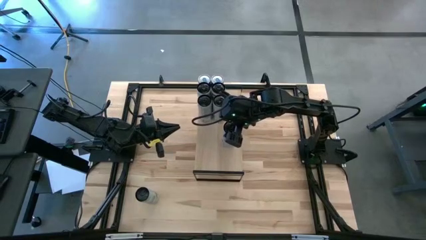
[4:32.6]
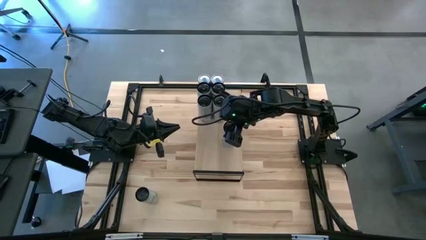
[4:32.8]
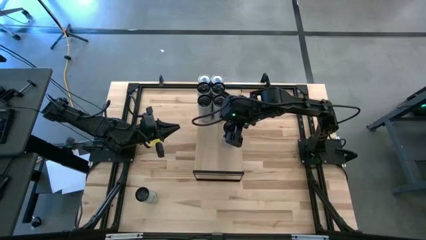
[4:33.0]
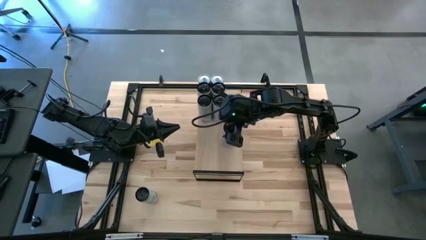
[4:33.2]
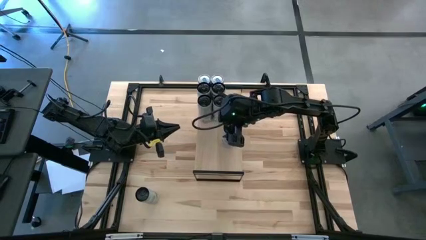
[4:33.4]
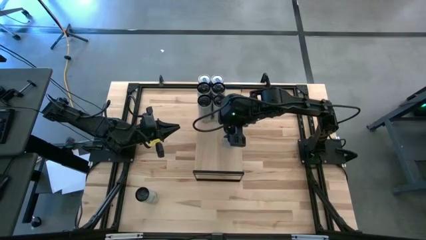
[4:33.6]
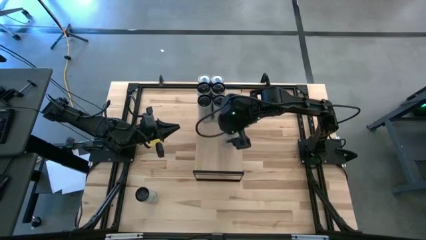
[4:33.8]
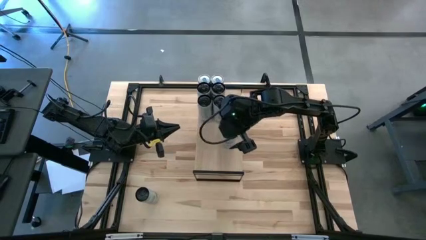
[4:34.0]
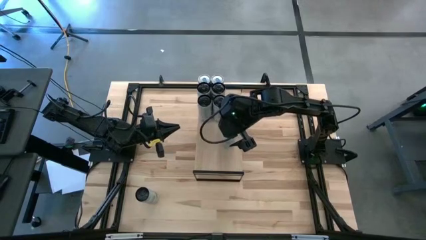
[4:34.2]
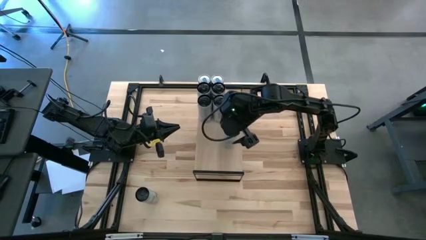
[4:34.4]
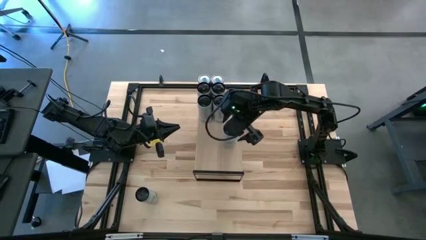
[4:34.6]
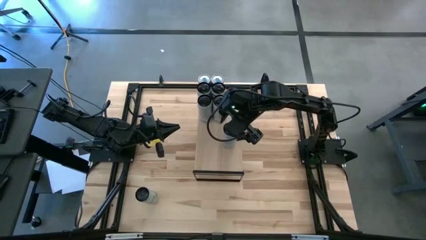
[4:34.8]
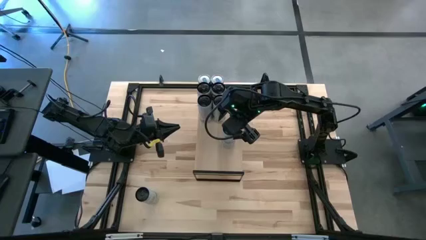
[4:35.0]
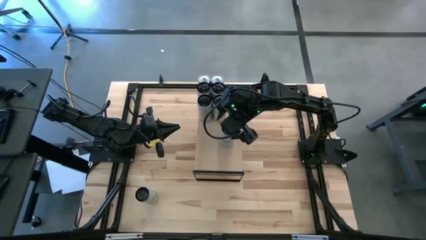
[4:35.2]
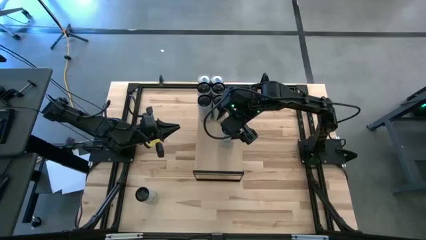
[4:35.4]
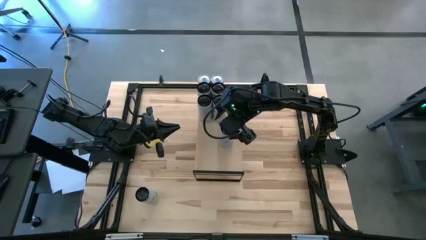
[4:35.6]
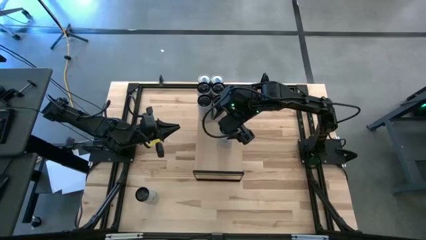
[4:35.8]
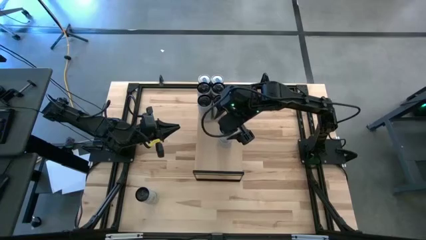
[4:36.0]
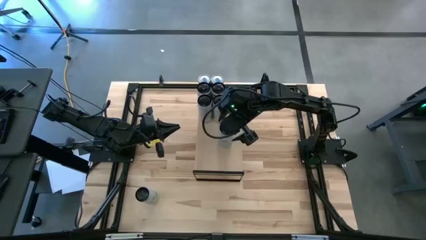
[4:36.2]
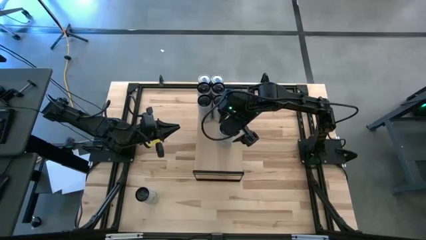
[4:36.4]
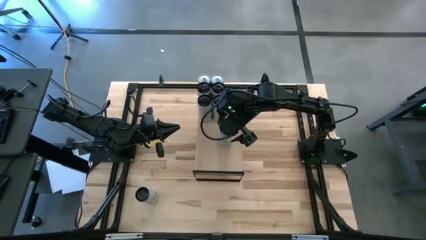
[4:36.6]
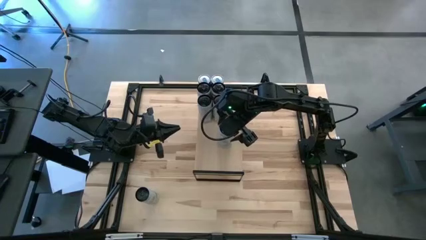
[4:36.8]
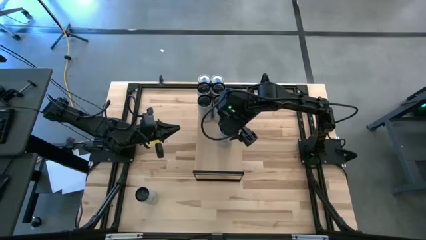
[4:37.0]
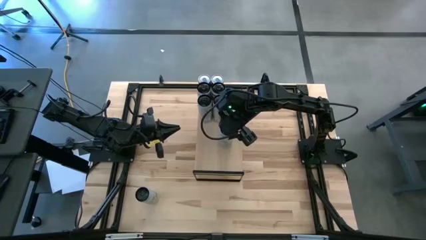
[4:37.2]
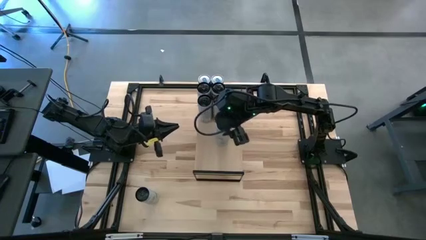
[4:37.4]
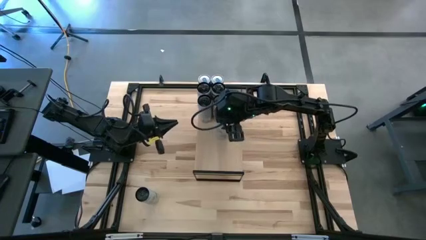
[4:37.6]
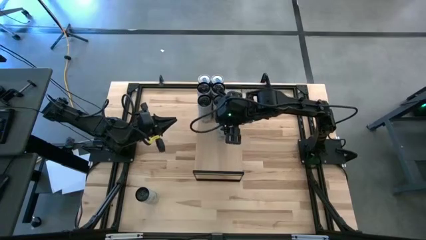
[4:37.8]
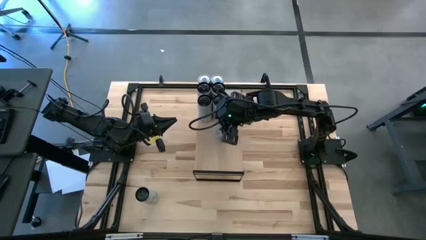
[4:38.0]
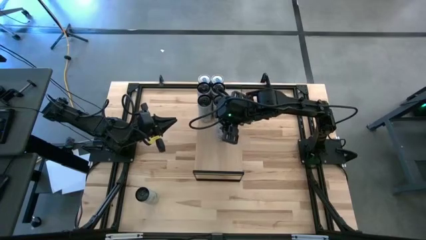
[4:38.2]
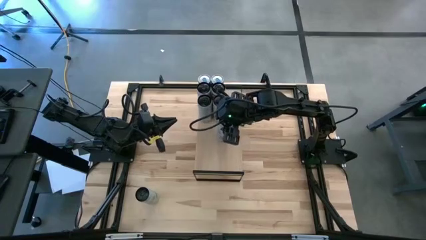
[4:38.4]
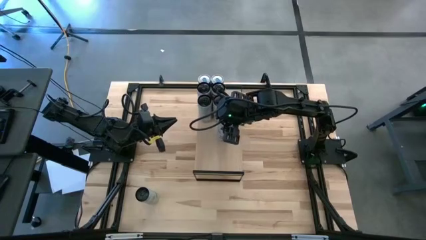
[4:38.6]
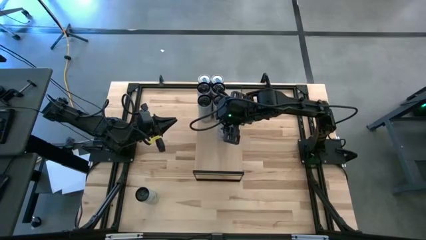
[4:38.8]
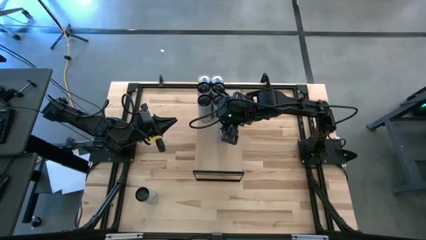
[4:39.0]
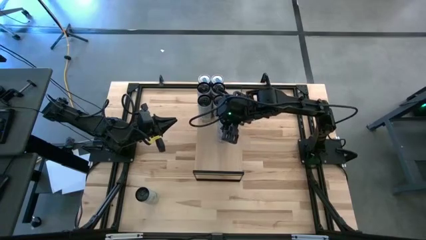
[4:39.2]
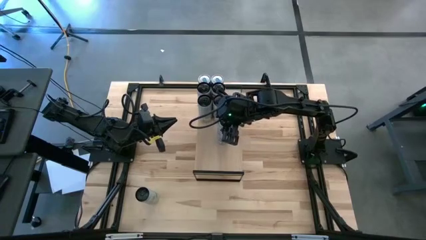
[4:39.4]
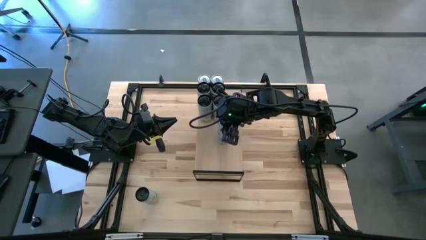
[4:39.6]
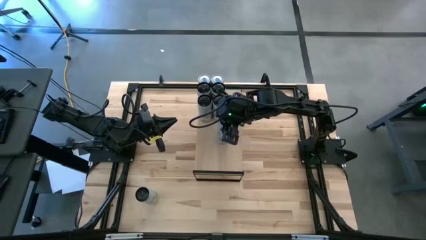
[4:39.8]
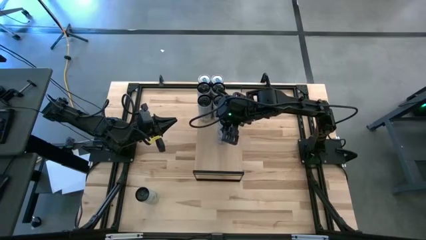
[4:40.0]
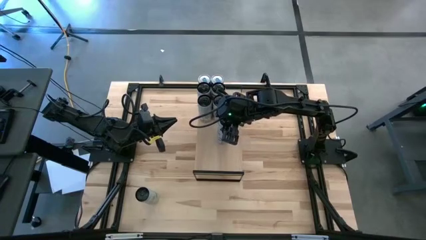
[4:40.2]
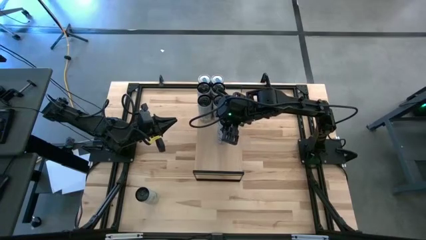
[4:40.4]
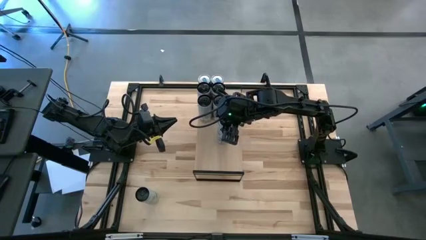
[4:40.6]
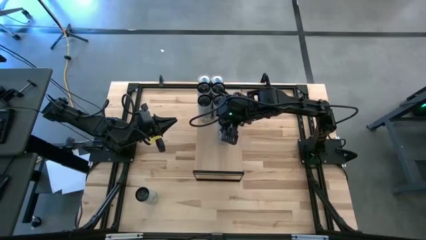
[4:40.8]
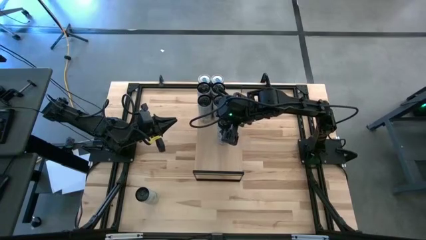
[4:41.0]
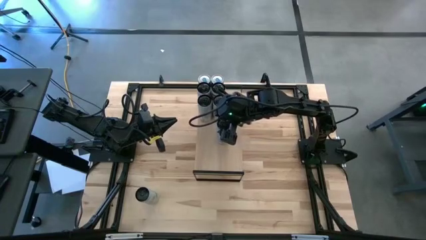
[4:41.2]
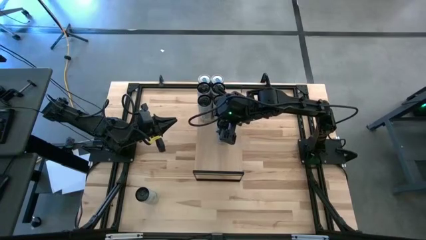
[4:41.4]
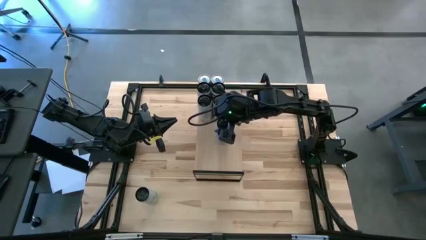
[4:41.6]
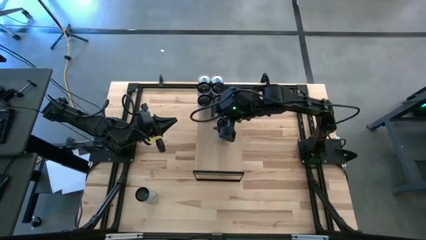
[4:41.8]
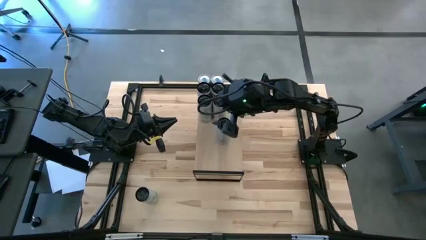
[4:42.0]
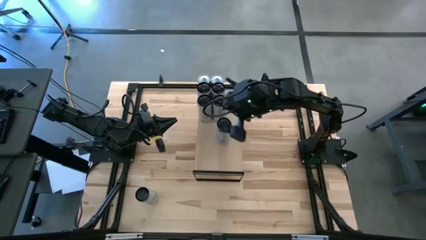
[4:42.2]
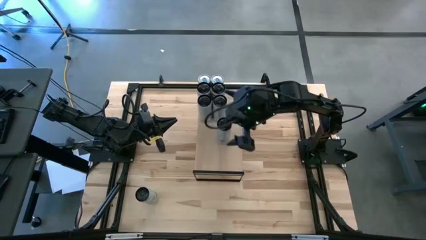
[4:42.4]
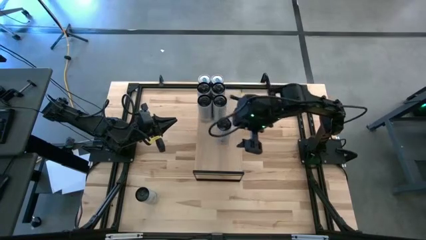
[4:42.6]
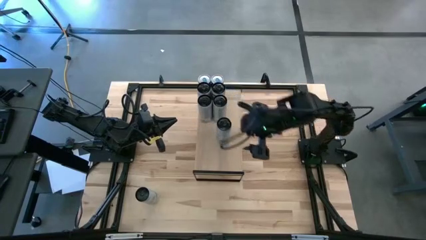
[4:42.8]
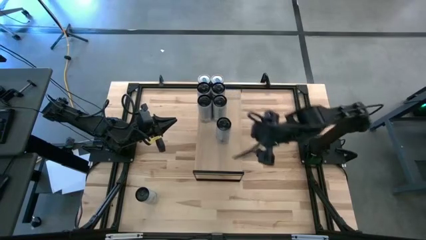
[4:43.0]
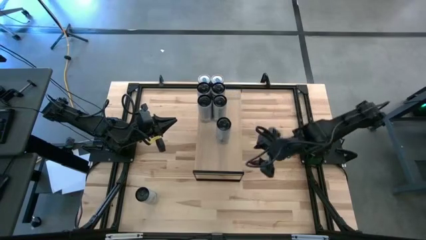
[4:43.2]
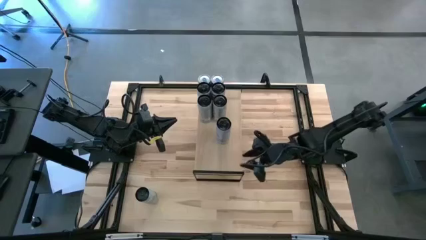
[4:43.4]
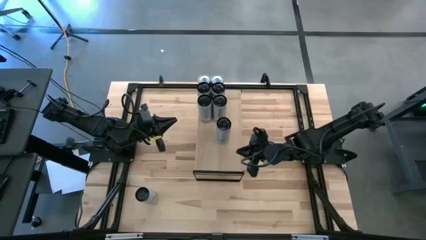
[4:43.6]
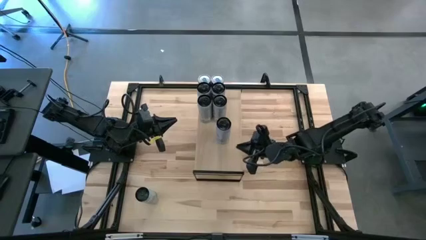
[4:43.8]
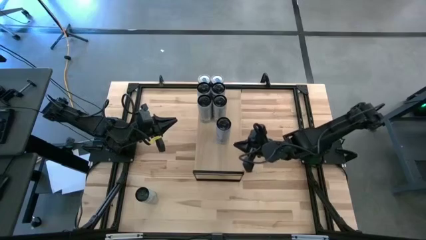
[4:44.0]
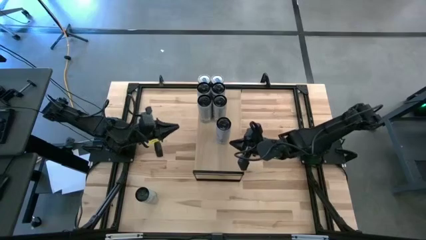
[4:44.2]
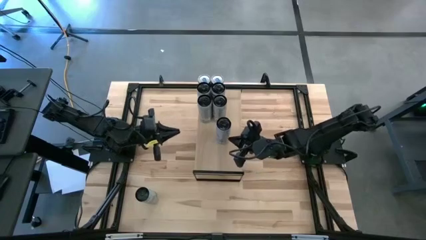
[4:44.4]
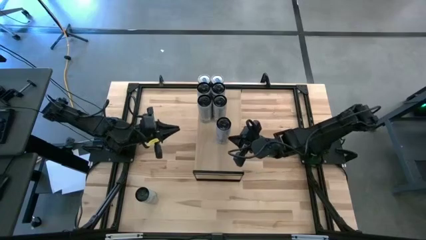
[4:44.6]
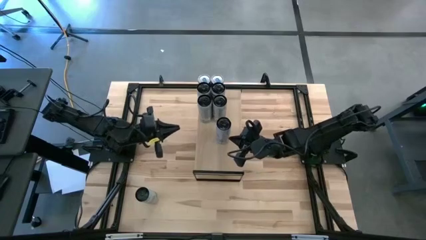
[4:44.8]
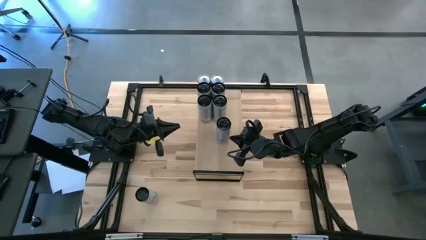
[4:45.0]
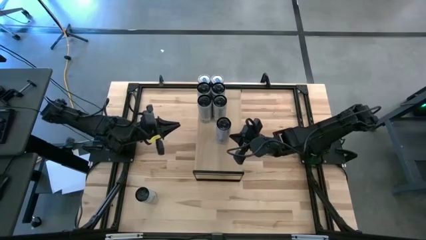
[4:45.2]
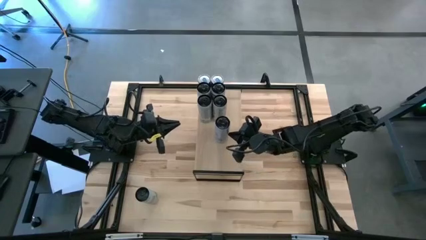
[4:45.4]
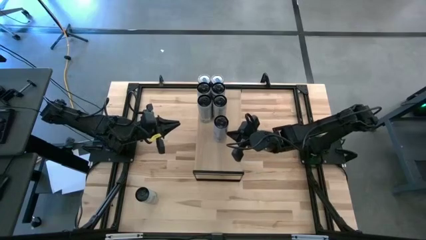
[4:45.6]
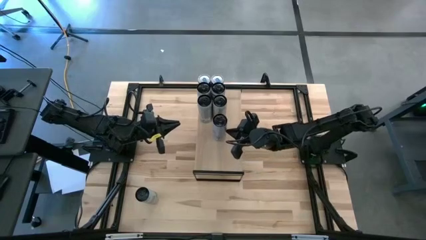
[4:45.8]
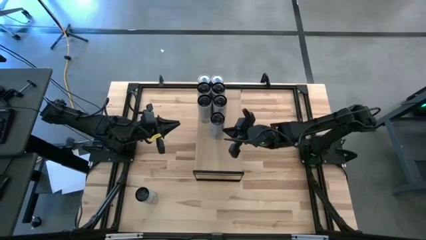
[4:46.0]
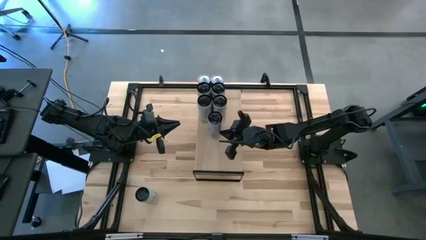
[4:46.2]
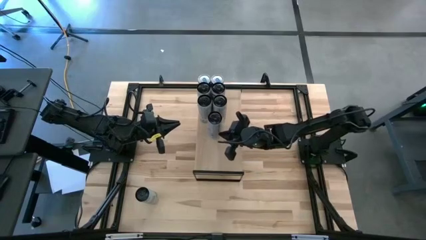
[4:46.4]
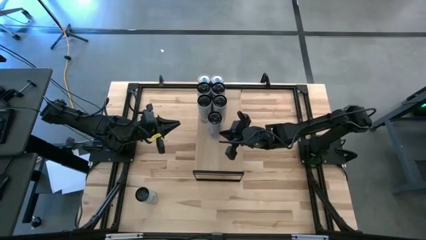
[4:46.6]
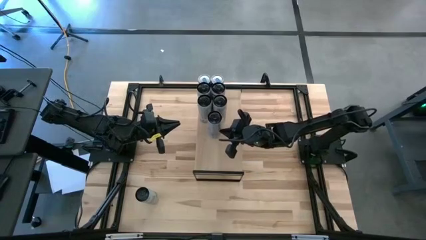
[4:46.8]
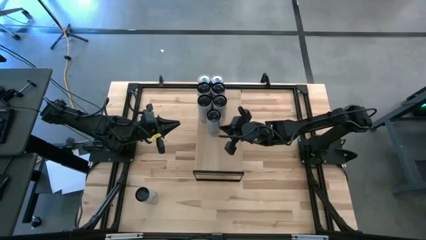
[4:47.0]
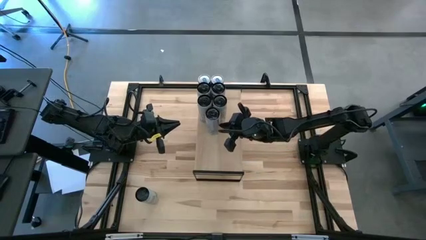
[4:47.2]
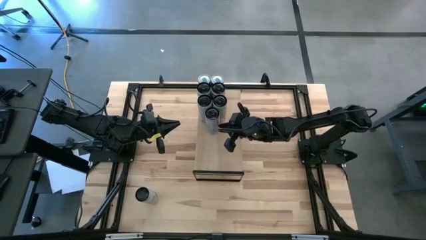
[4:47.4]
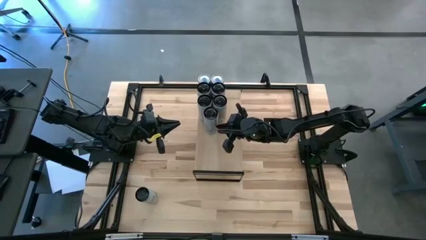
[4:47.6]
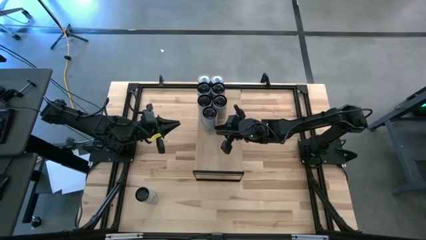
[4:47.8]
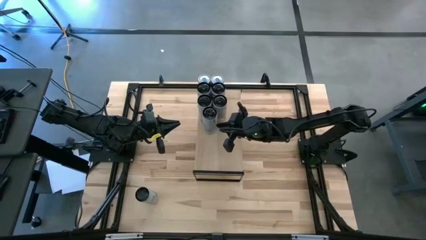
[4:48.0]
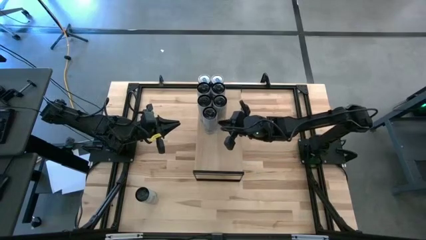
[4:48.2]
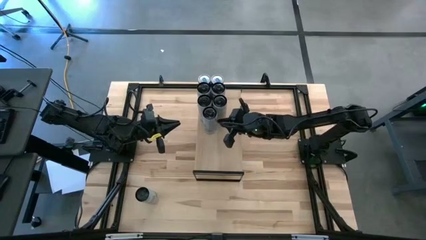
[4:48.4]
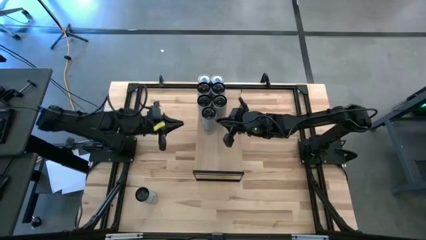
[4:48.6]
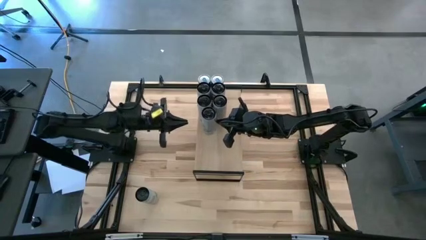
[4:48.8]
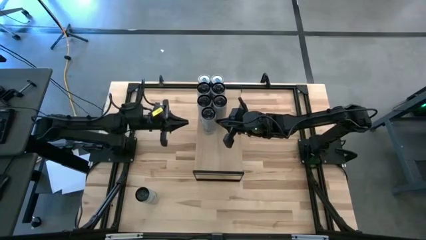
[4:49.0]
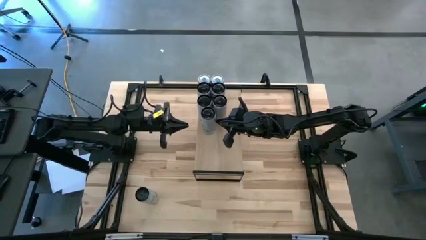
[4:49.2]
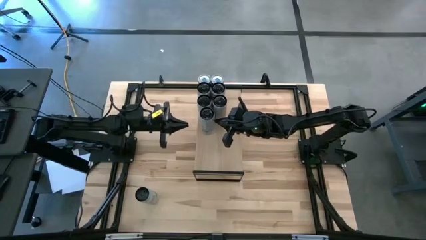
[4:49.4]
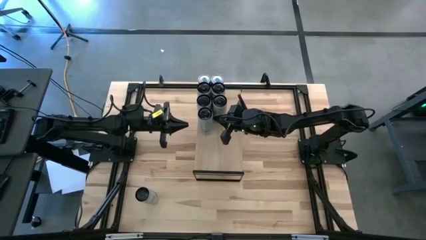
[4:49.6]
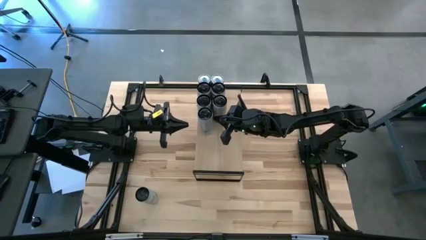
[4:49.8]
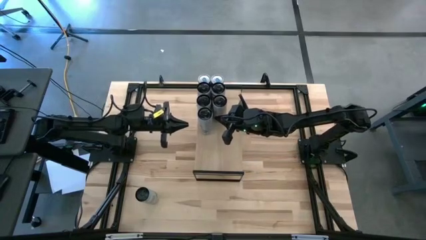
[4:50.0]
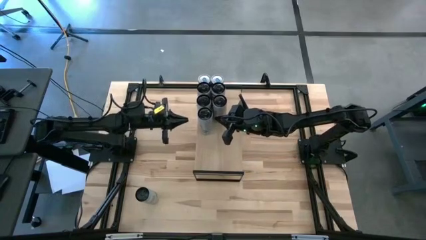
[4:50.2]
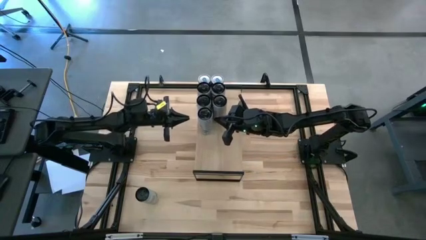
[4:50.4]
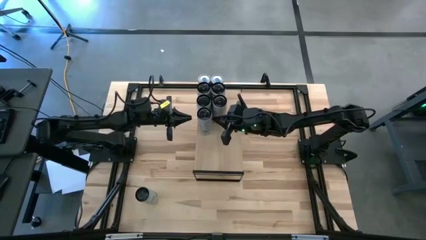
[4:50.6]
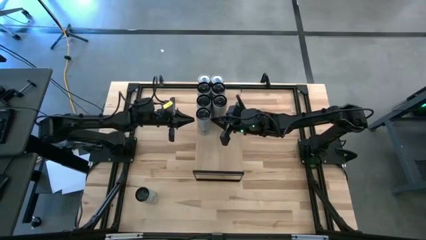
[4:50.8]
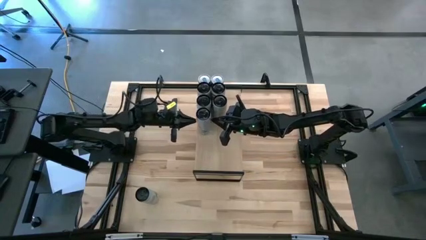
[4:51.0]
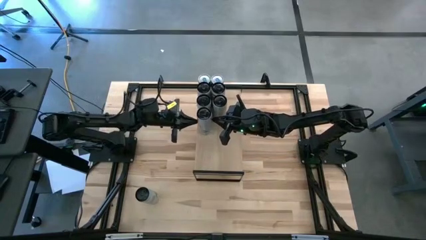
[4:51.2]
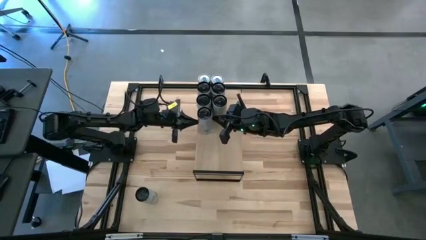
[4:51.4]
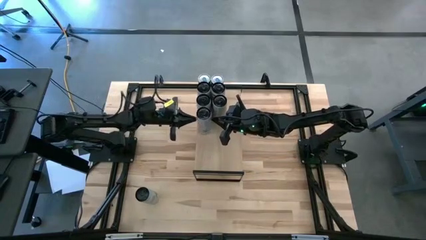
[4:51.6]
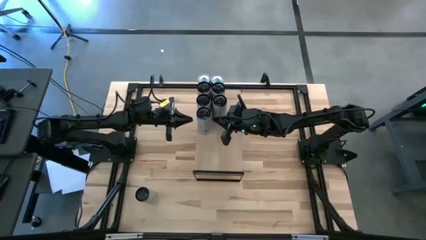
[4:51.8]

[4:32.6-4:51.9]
Task: Place canned beverage on shelf
Put the right white blue soda can on the shelf
